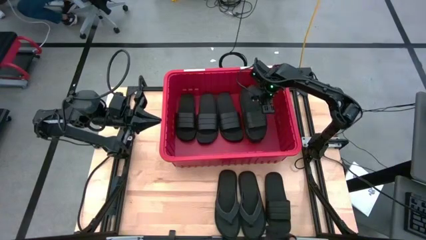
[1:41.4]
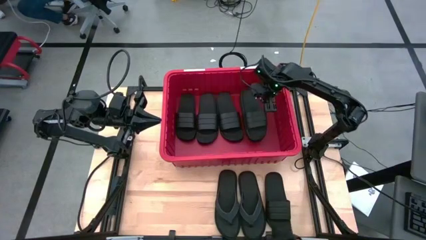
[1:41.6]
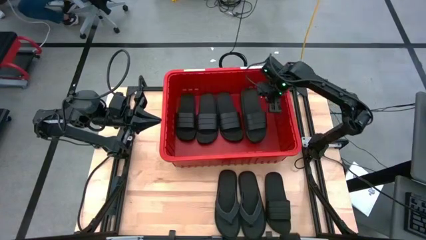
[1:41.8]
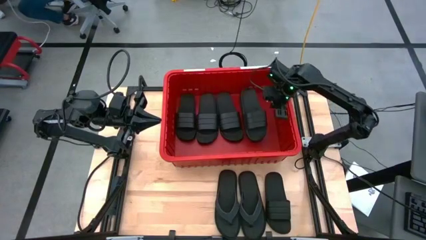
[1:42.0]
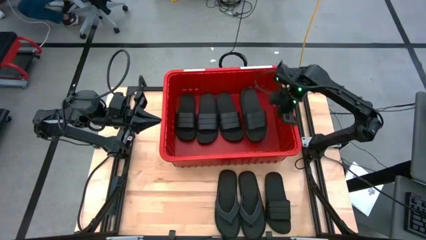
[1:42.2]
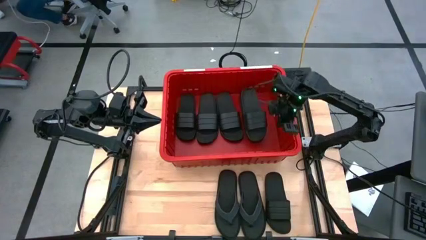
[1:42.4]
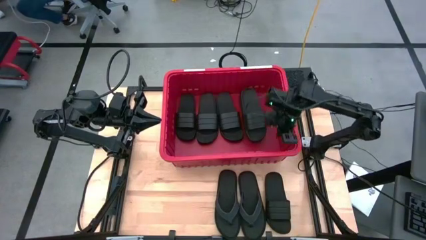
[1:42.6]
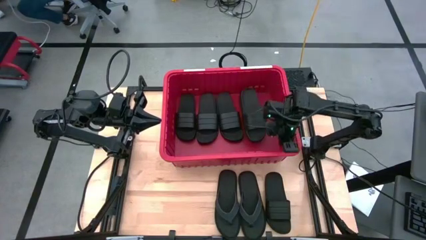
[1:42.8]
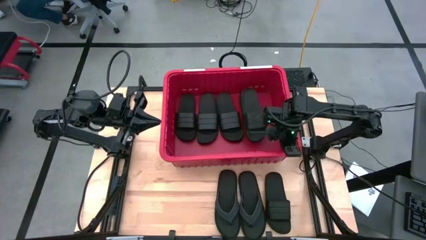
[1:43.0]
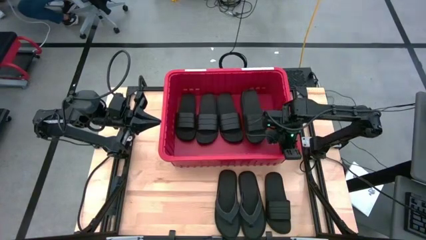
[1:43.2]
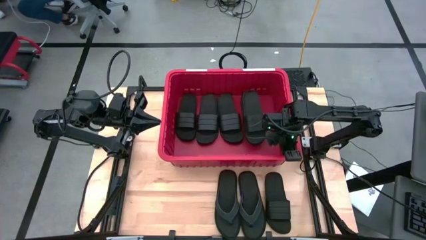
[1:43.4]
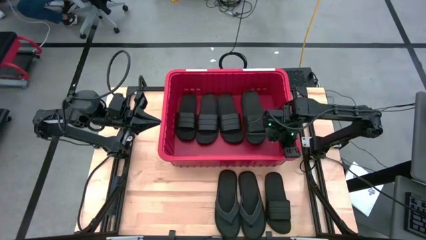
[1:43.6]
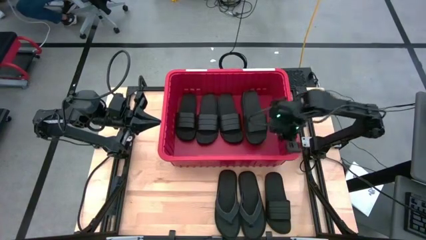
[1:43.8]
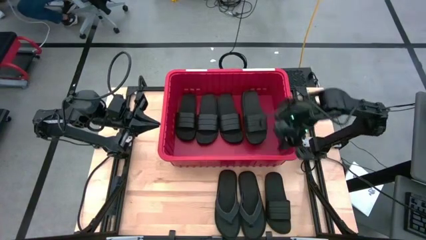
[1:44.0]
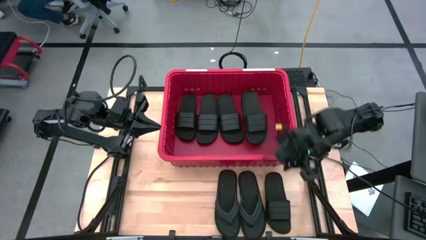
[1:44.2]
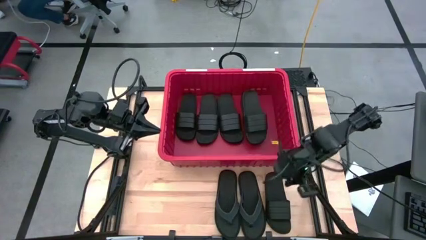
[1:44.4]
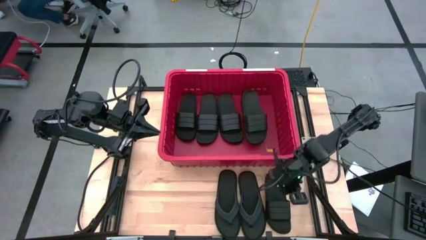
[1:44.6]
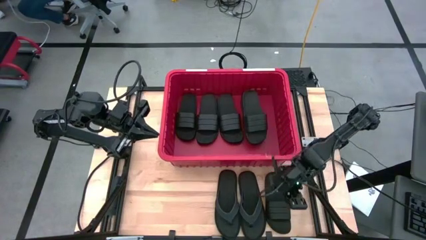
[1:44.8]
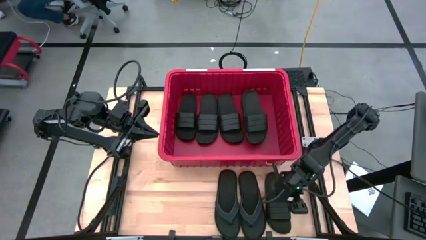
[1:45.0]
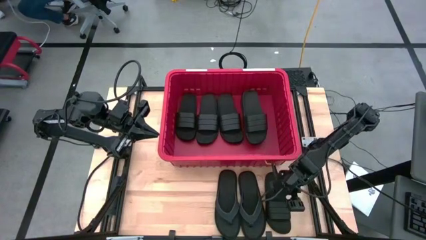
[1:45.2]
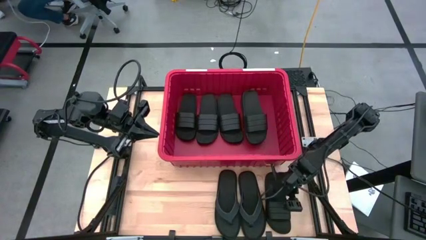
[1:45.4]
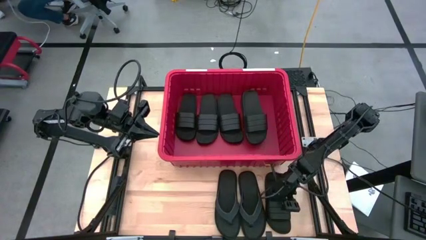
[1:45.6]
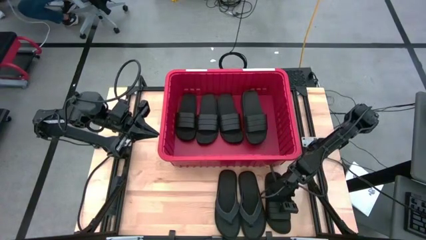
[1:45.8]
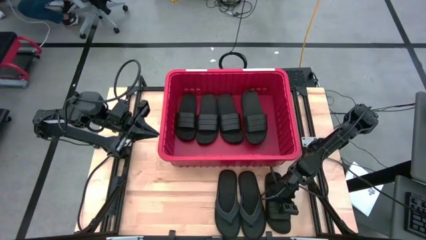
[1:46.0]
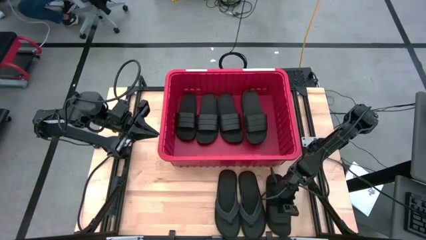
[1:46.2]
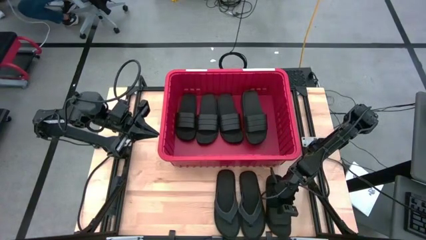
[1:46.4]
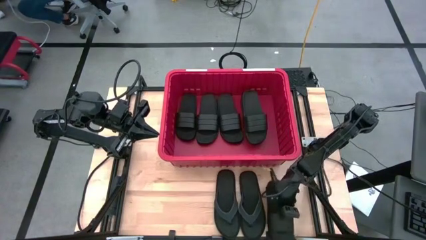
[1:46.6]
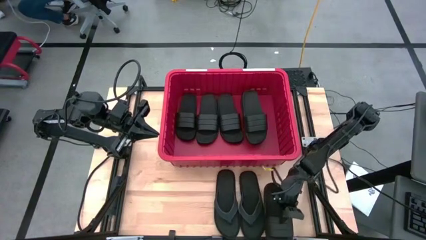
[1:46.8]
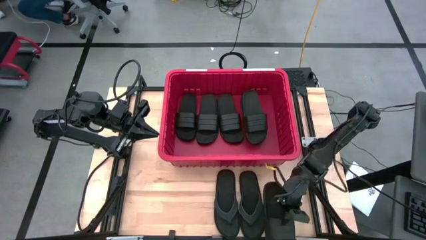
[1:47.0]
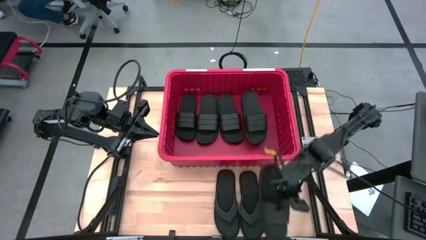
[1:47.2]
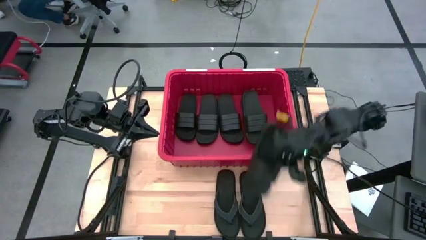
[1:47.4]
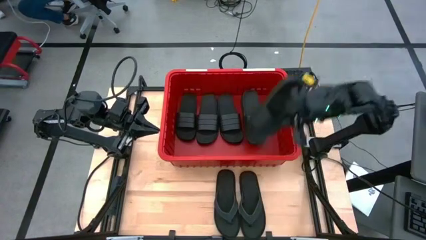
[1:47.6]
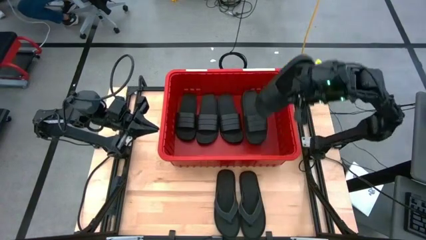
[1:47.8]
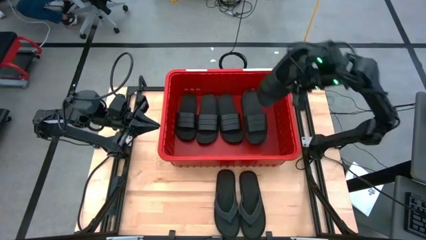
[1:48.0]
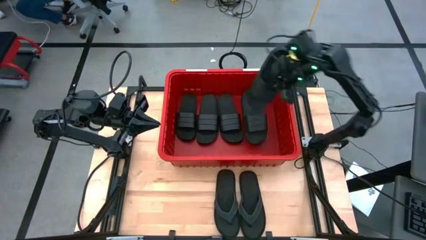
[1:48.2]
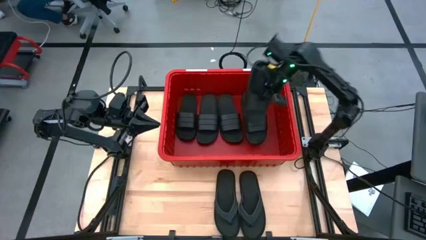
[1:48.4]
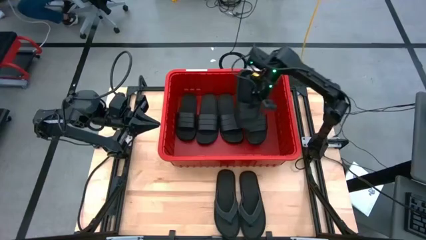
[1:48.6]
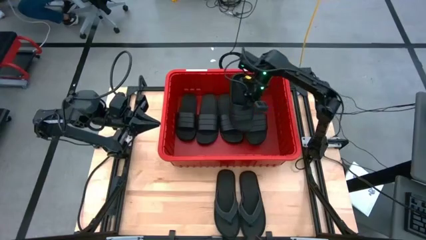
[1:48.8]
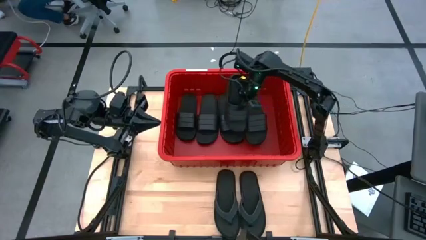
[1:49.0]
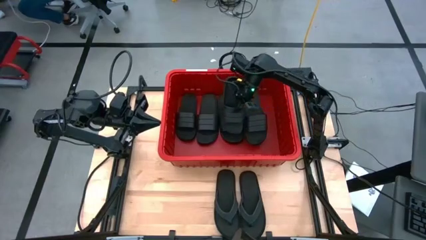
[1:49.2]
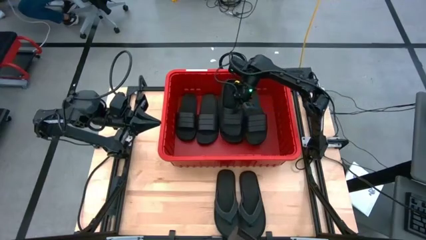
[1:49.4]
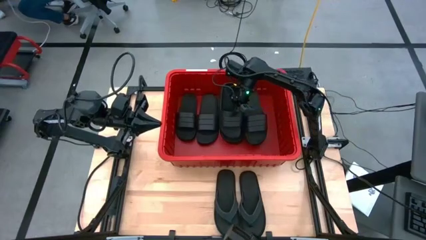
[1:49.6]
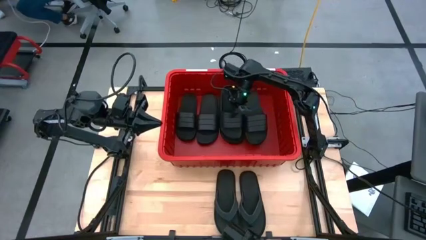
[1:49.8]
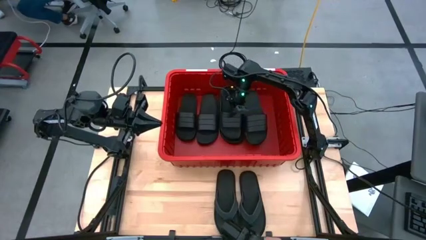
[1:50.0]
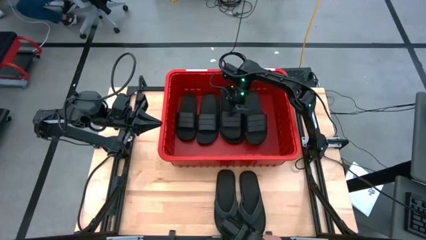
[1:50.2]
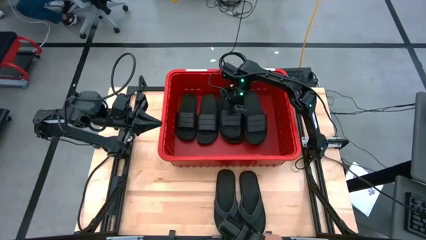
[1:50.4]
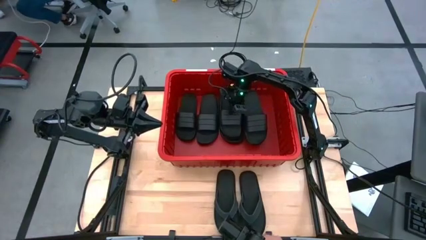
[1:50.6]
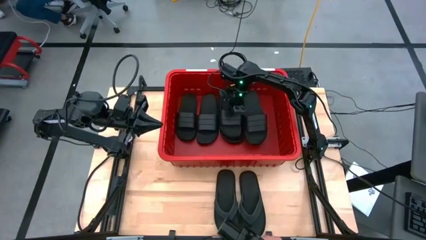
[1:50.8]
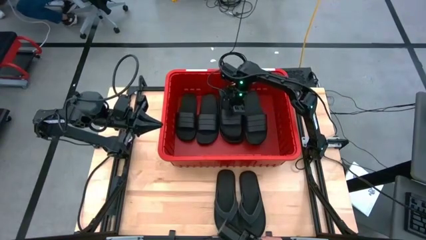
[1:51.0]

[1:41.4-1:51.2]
Task: Pick and place slides into bin
Put the black slides into the red bin
